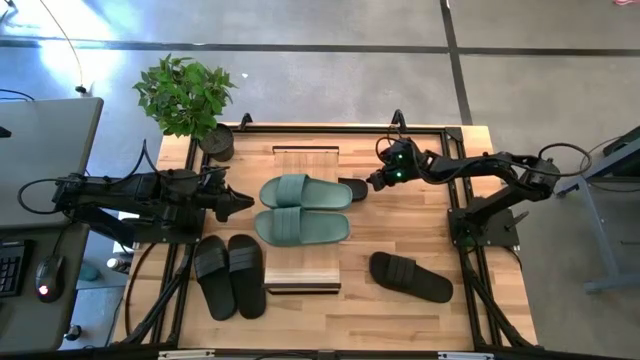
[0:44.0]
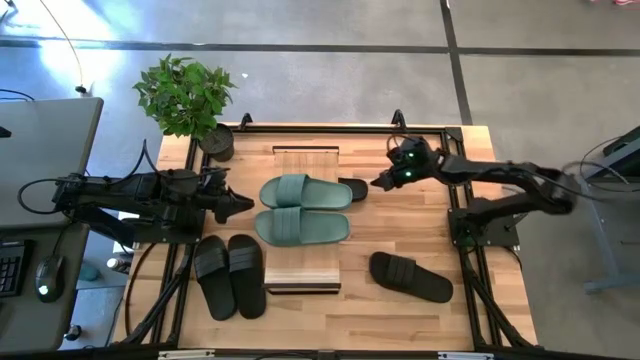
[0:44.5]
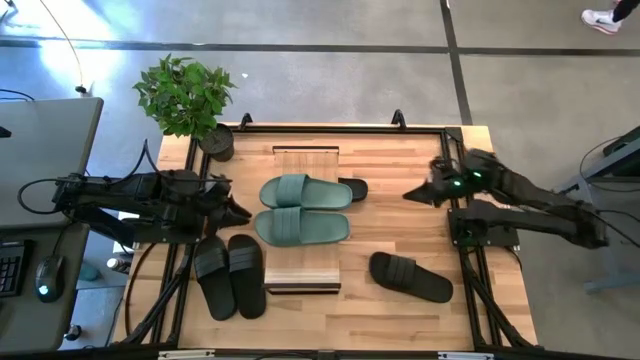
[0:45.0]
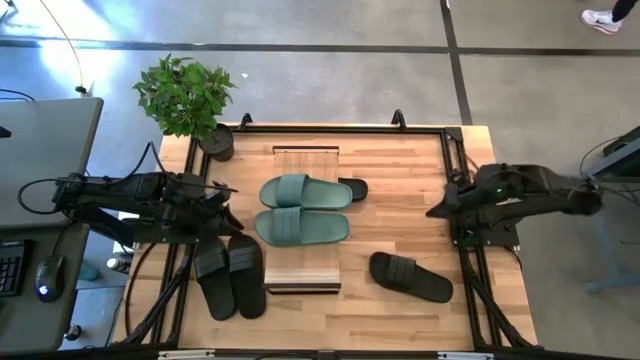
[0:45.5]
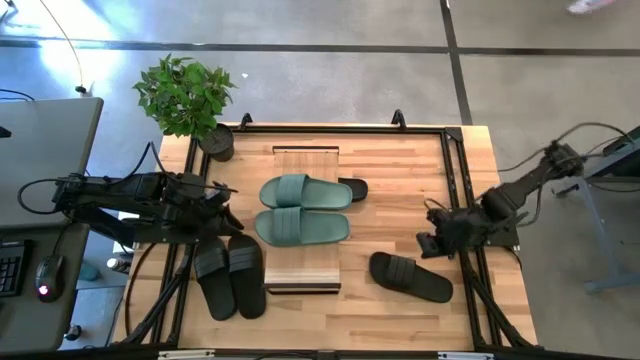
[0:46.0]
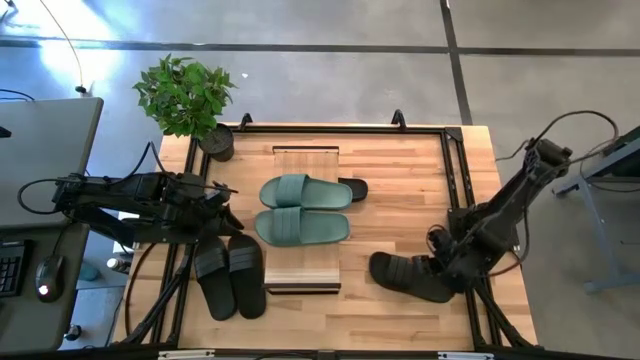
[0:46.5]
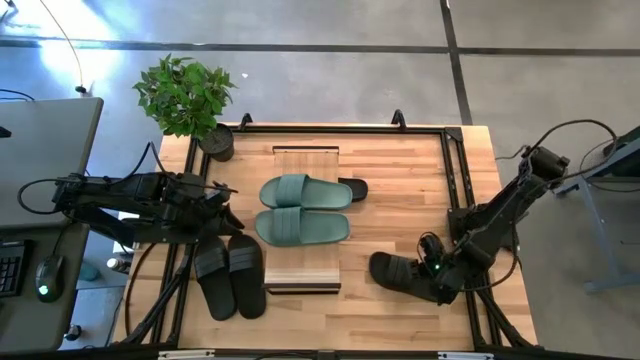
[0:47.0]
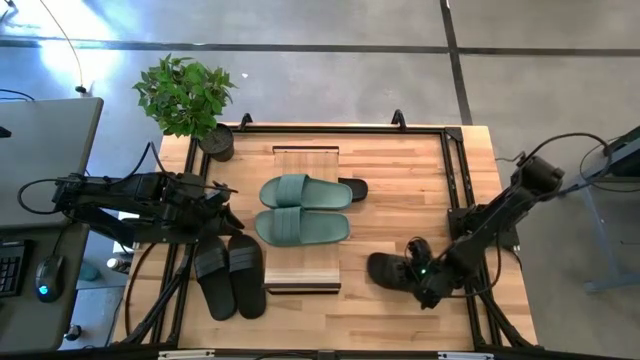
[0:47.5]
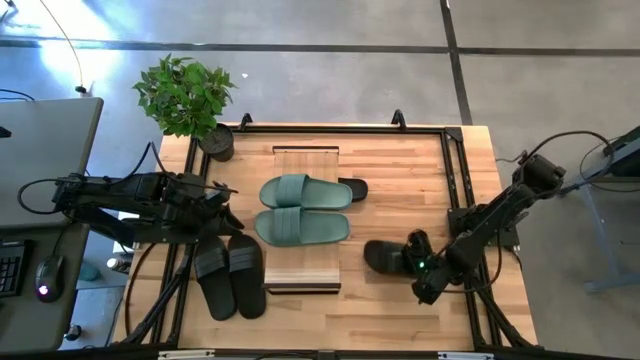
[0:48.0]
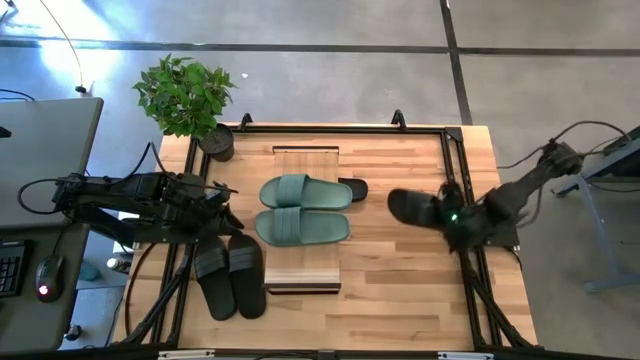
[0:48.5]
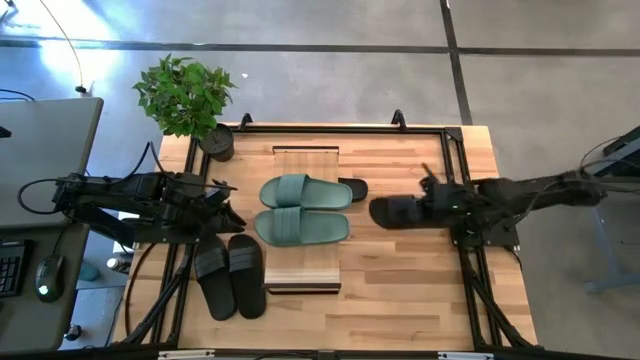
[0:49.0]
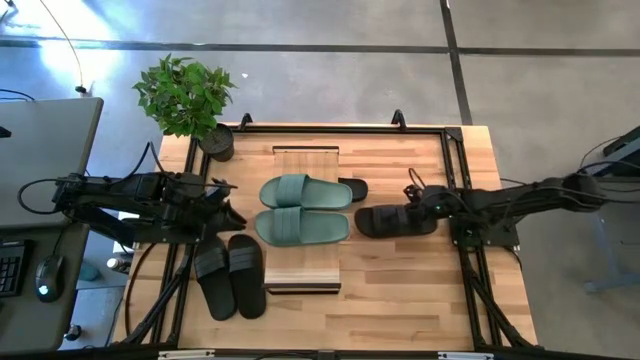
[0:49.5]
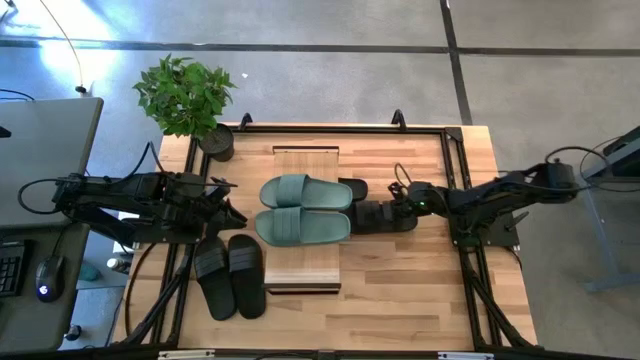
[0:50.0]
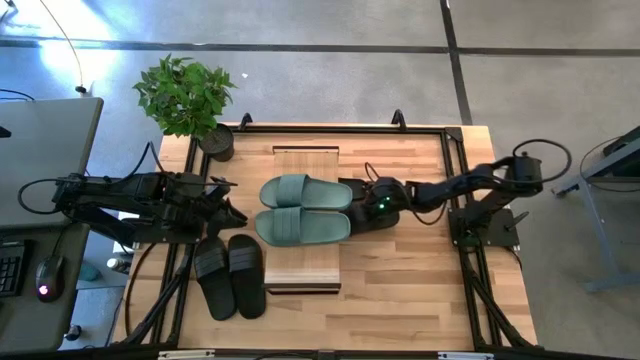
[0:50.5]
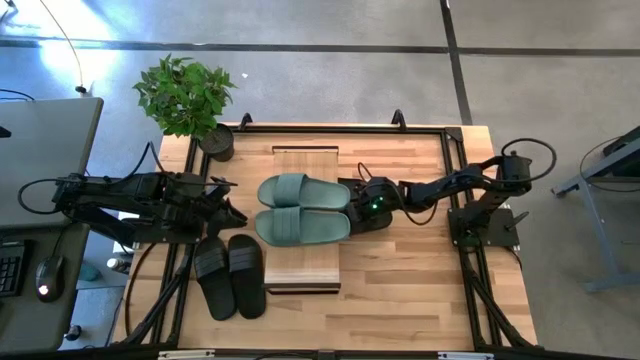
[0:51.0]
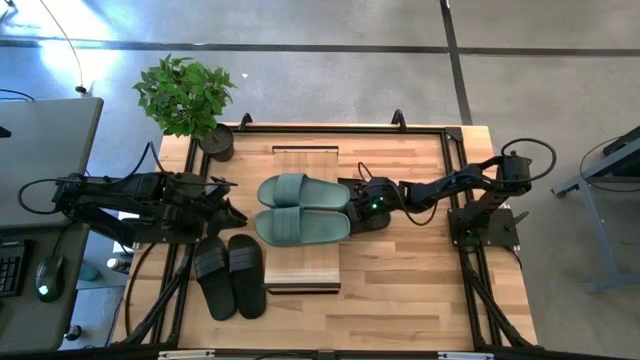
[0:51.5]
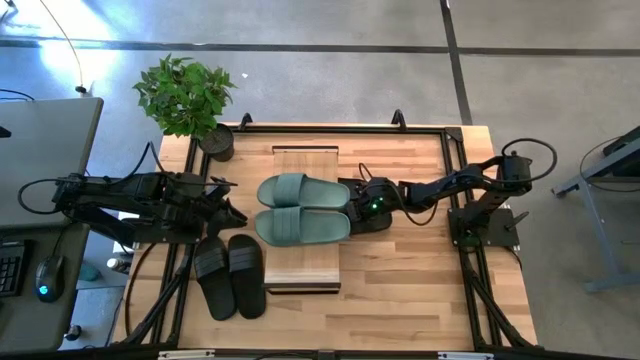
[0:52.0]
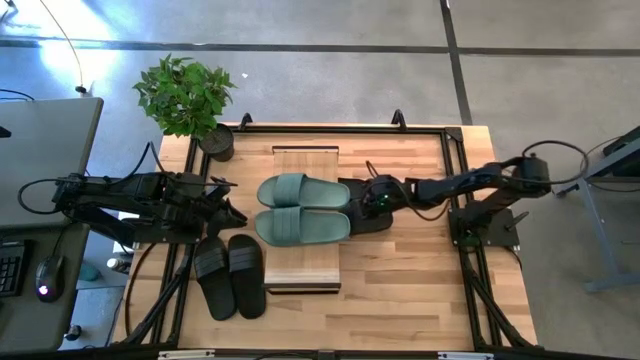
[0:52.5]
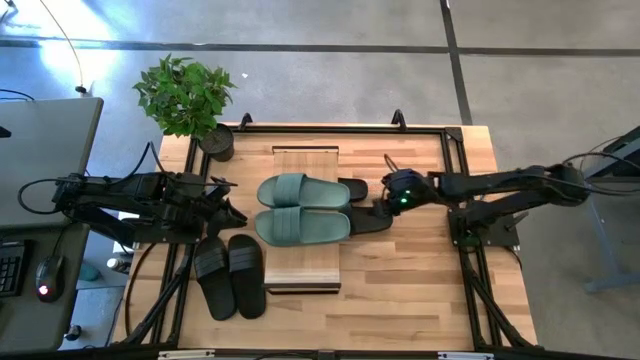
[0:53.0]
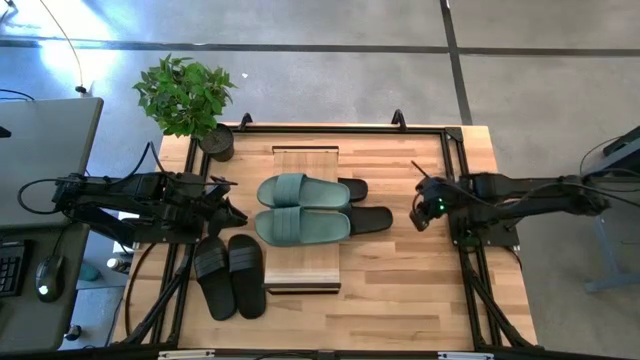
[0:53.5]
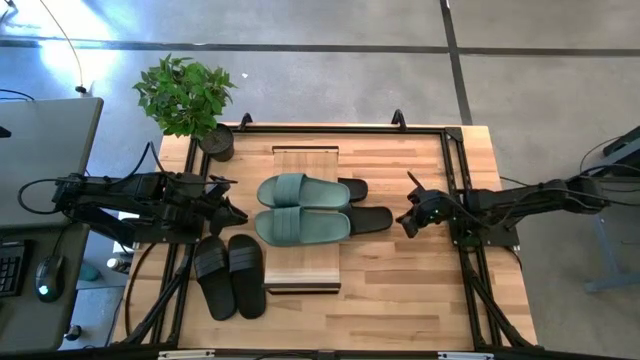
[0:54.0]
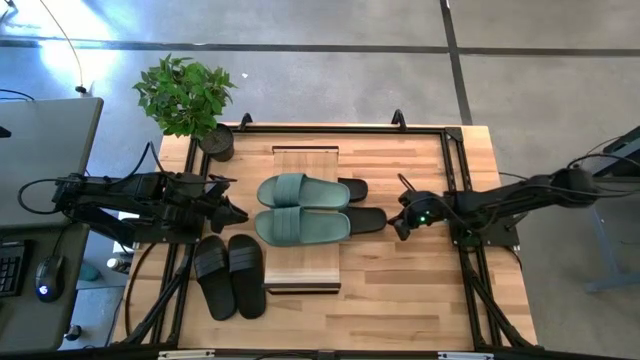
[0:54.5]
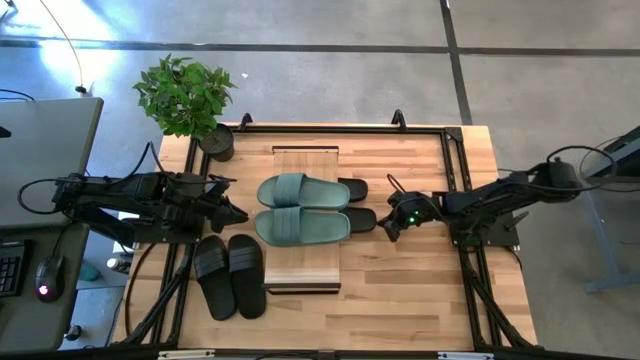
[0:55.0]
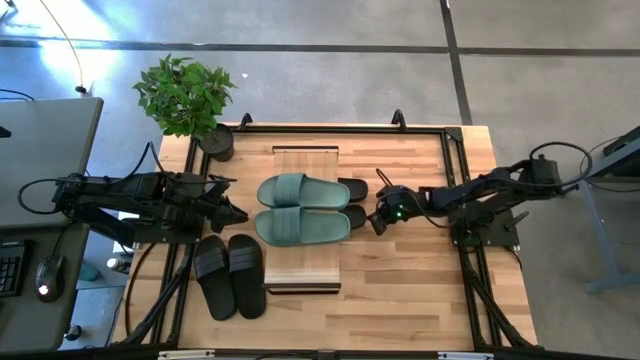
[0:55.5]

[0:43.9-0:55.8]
Task: Pick and place slides into the shelf
Put the black slipper under the shelf

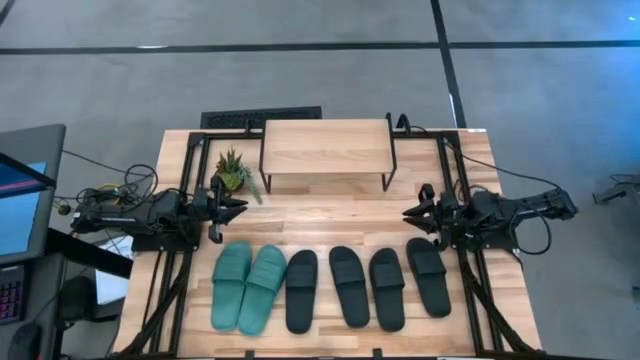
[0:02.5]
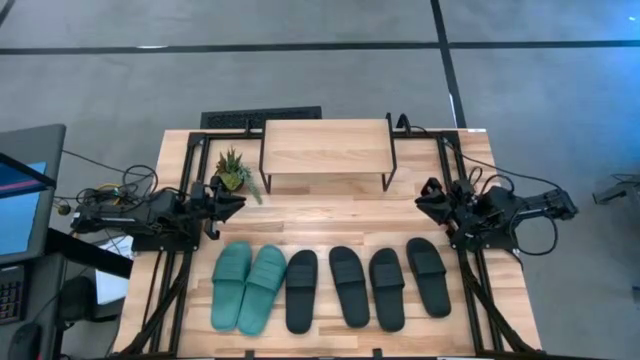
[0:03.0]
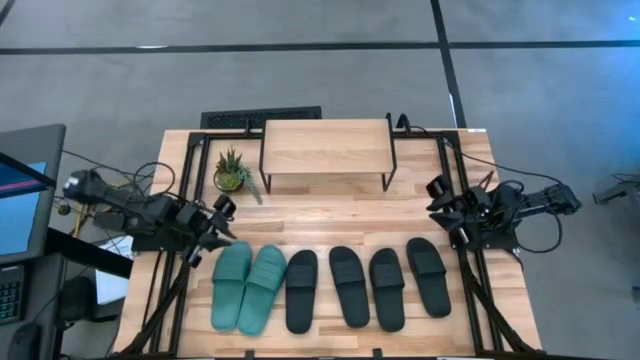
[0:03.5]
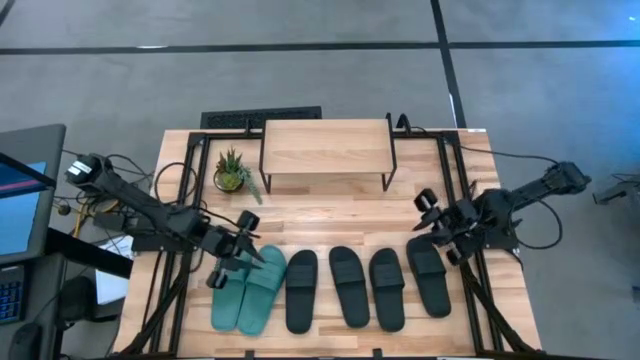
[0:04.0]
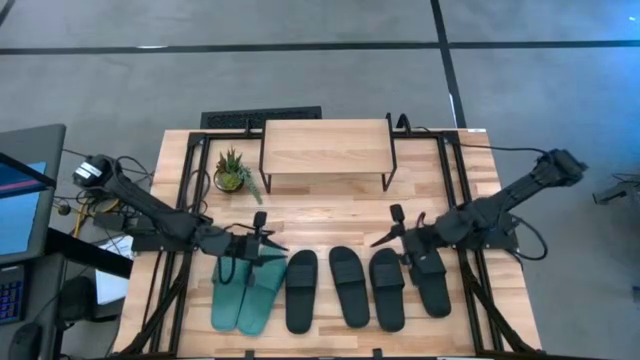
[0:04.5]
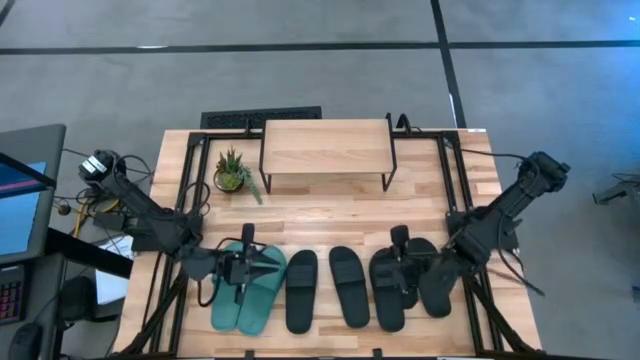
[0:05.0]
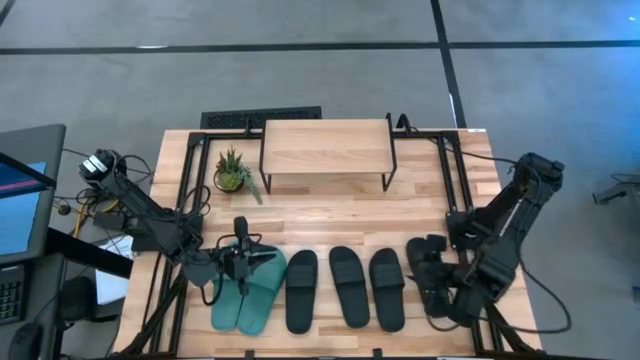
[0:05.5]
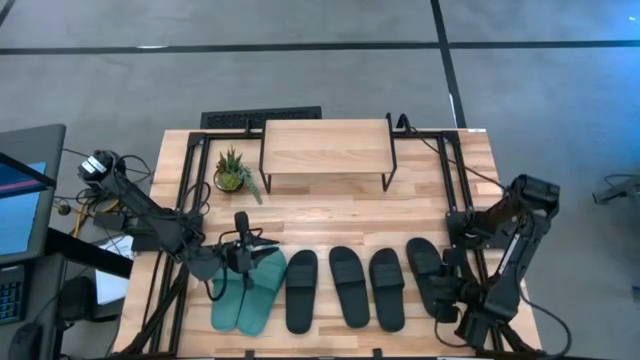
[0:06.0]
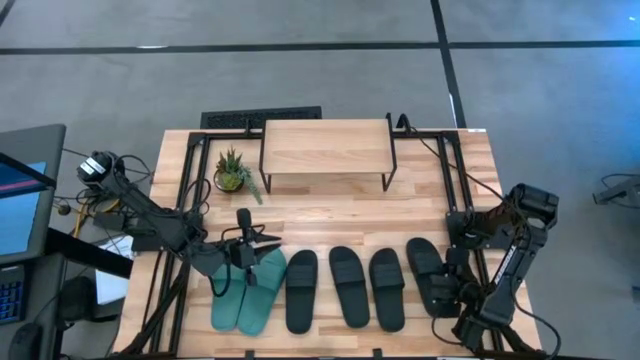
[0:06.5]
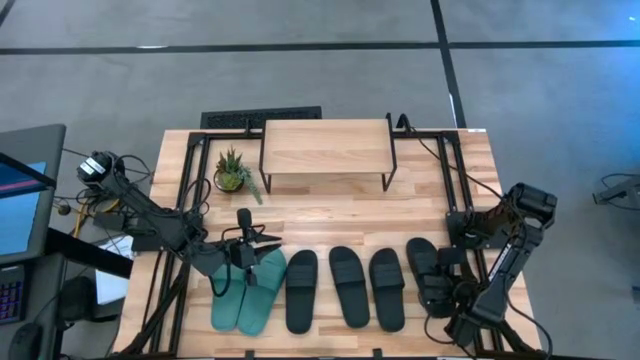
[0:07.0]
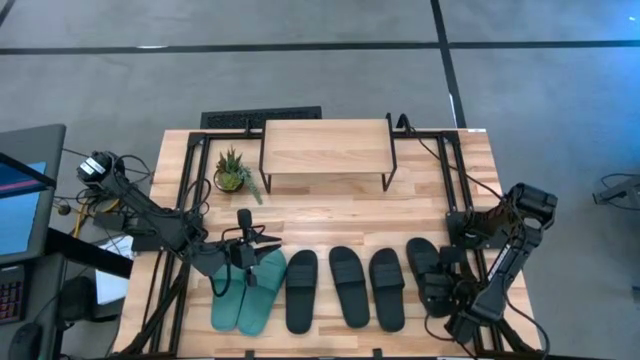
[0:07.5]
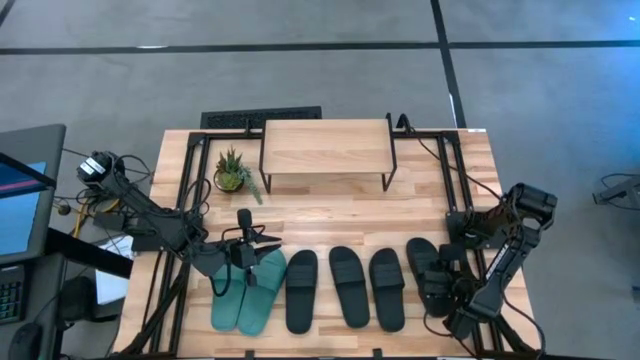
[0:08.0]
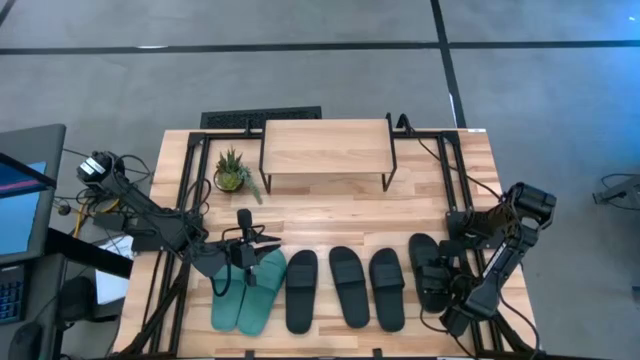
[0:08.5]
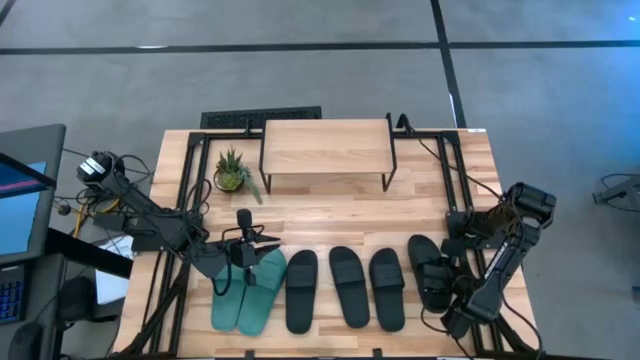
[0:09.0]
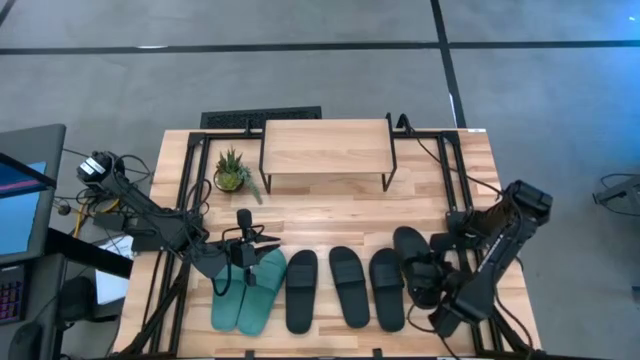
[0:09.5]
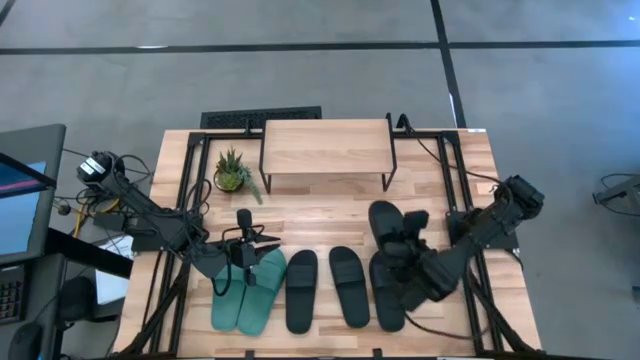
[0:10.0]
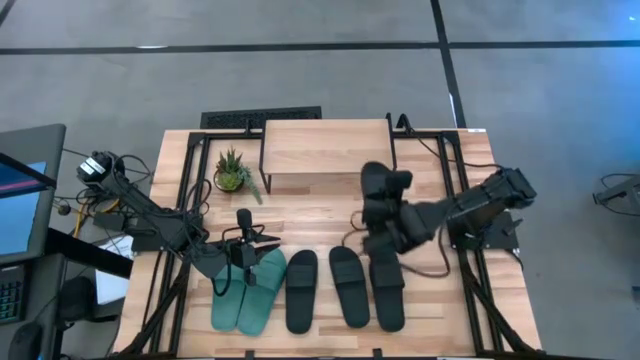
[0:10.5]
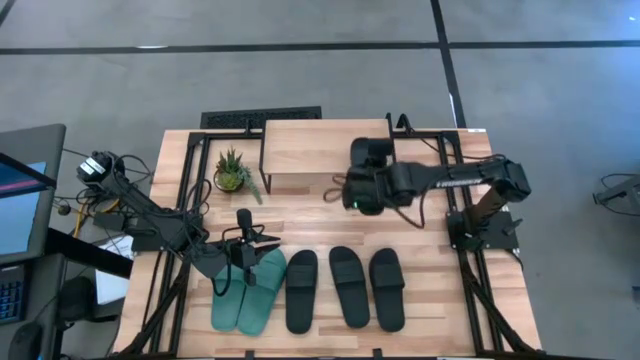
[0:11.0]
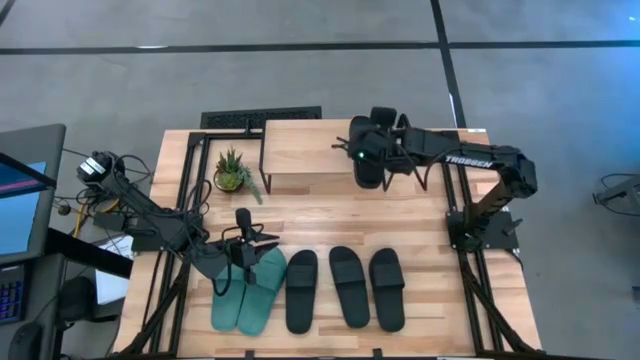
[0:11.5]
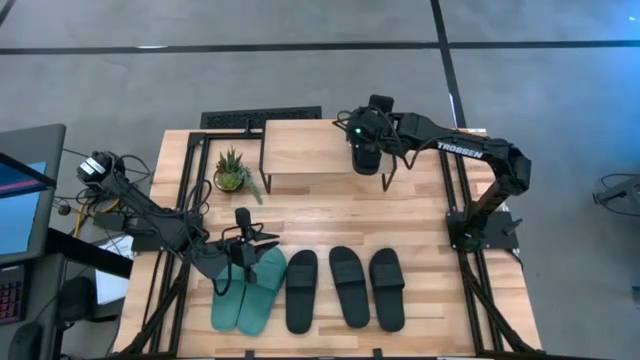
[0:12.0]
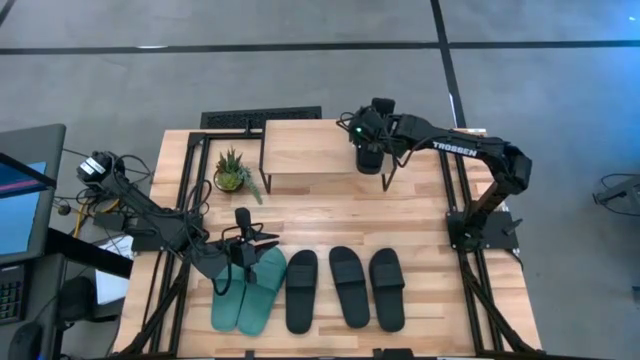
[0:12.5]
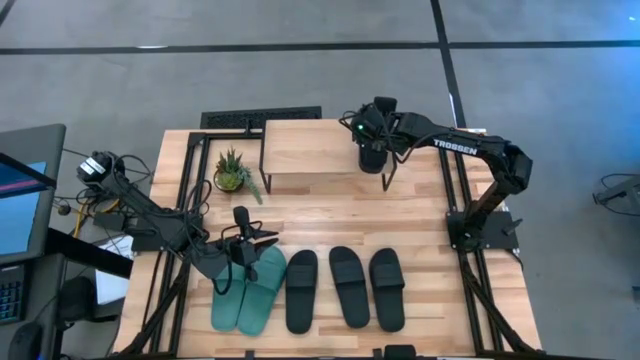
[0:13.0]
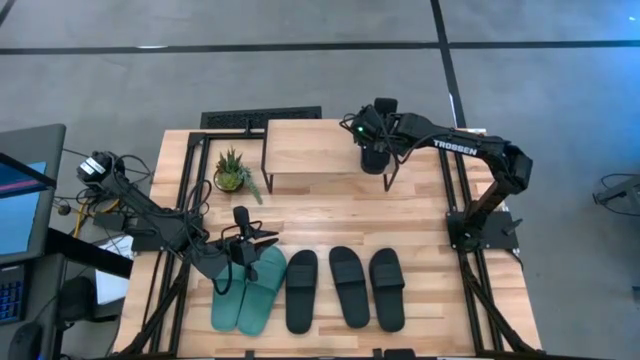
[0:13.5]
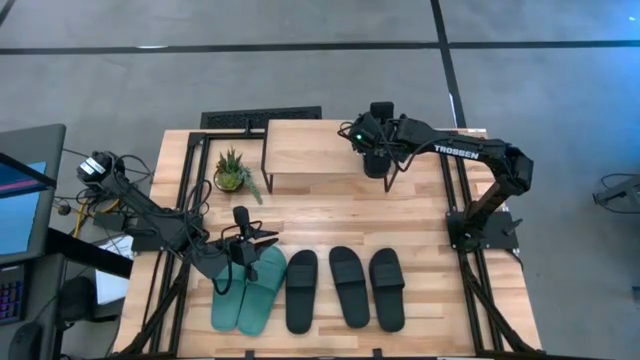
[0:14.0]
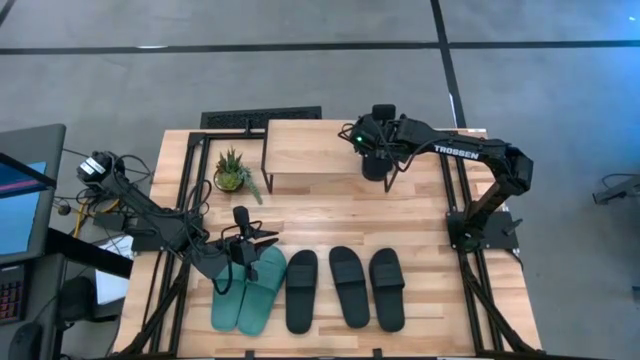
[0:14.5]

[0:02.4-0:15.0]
Task: Pick and place slides into the shelf
Put the black slipper on the shelf
